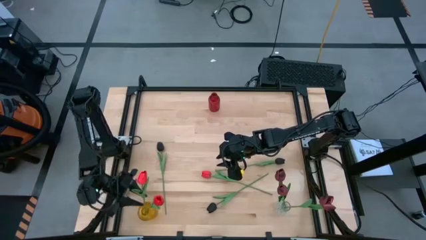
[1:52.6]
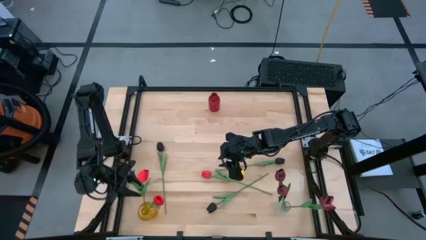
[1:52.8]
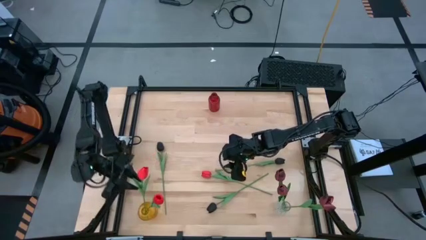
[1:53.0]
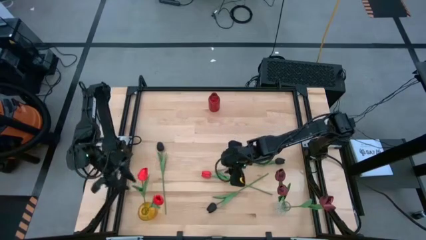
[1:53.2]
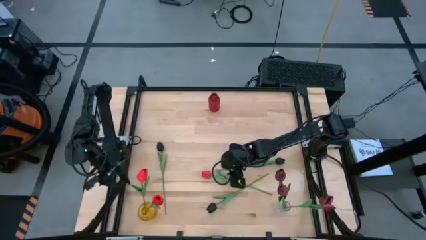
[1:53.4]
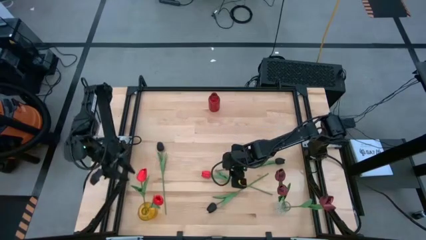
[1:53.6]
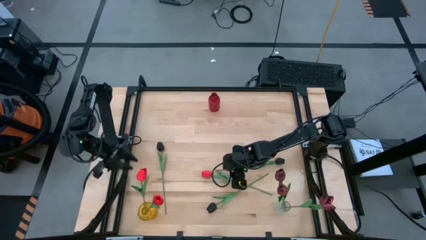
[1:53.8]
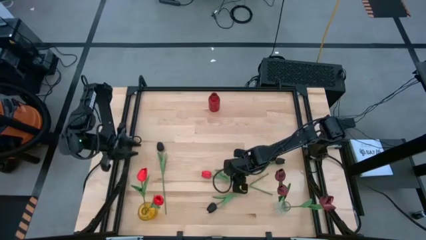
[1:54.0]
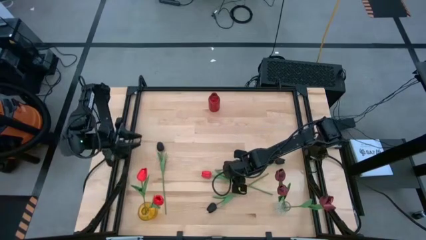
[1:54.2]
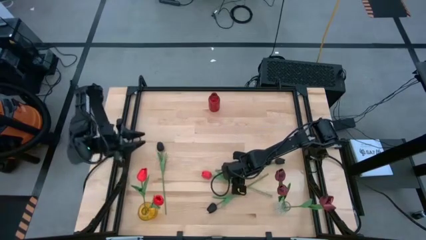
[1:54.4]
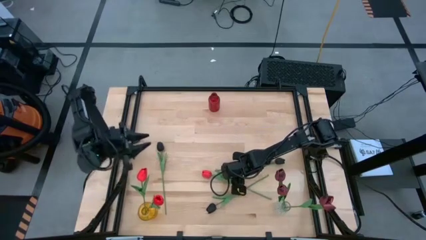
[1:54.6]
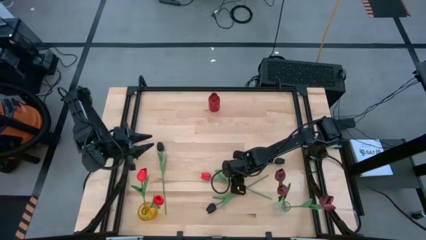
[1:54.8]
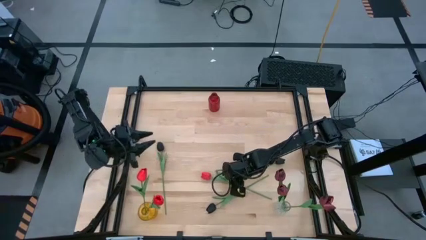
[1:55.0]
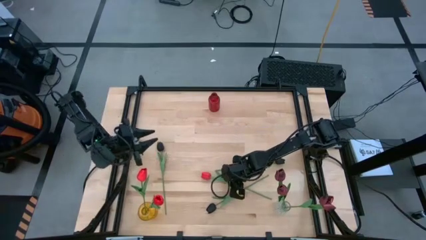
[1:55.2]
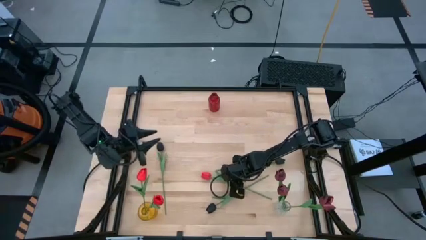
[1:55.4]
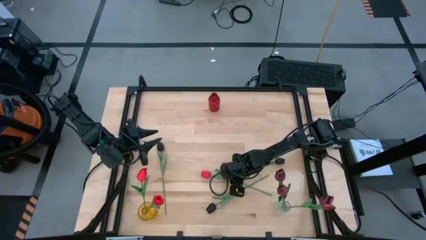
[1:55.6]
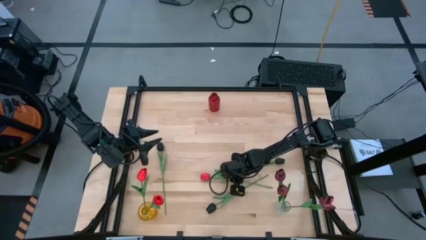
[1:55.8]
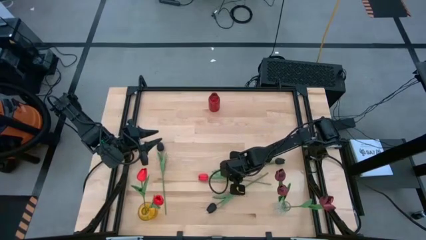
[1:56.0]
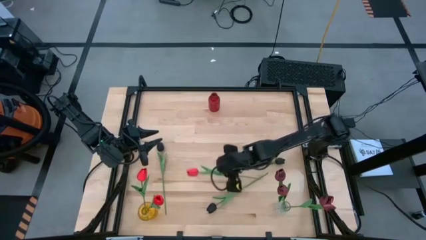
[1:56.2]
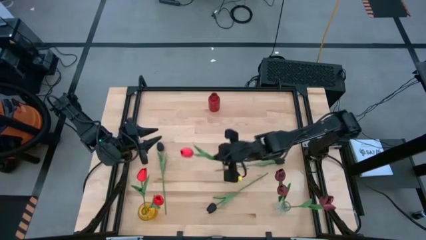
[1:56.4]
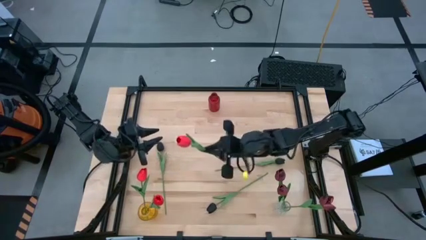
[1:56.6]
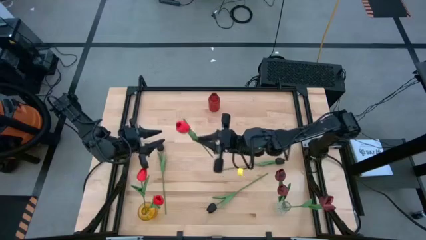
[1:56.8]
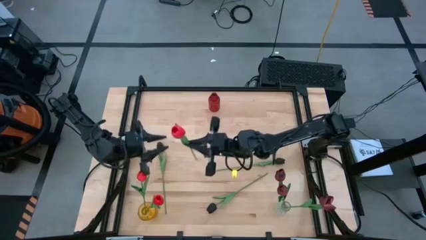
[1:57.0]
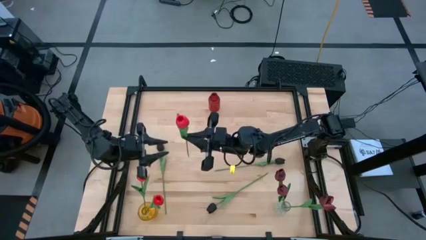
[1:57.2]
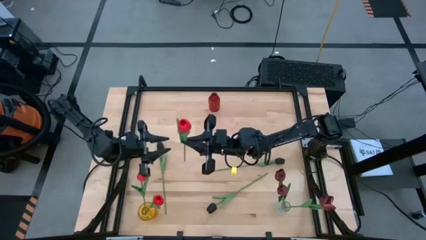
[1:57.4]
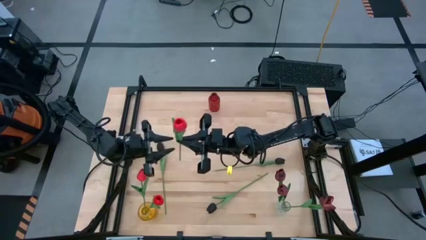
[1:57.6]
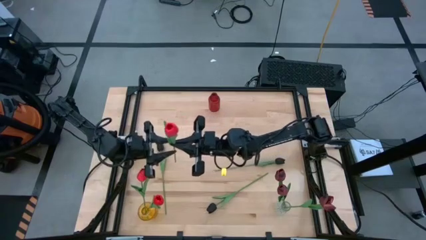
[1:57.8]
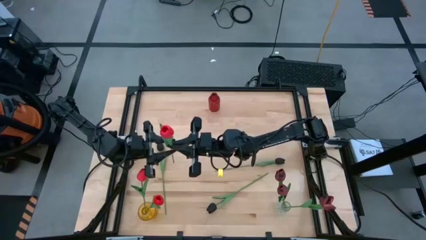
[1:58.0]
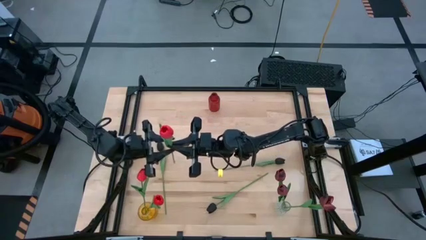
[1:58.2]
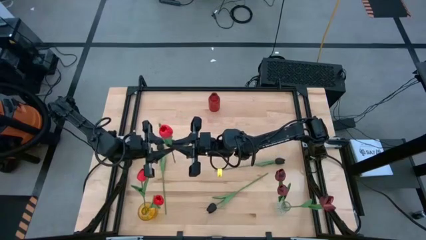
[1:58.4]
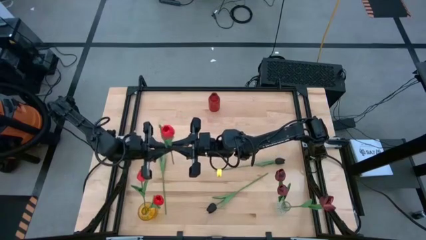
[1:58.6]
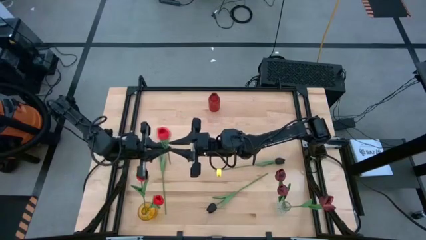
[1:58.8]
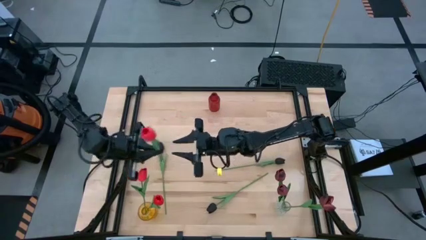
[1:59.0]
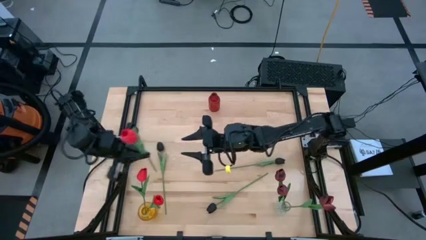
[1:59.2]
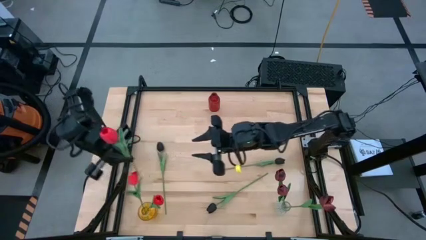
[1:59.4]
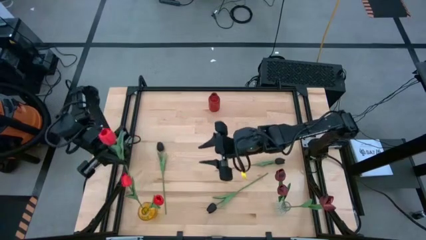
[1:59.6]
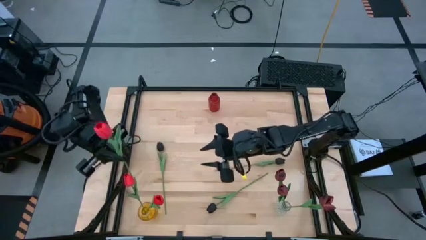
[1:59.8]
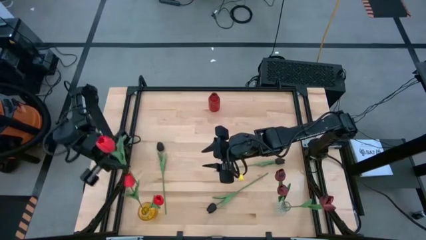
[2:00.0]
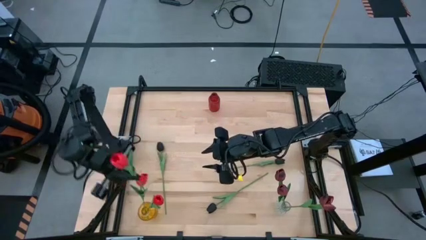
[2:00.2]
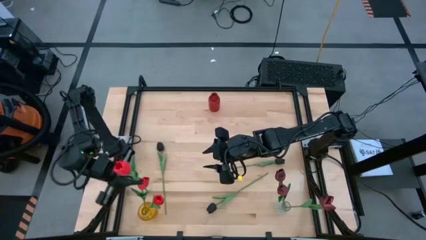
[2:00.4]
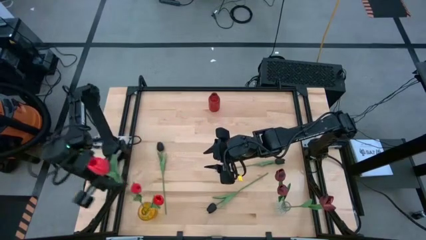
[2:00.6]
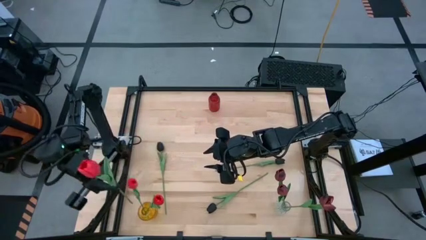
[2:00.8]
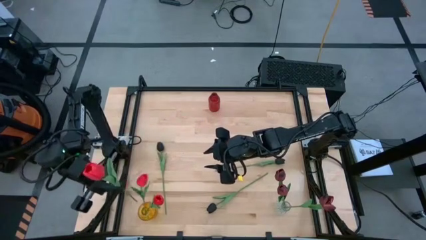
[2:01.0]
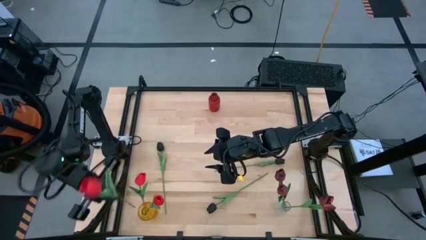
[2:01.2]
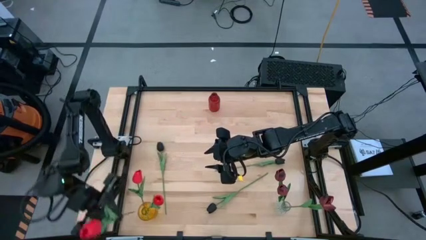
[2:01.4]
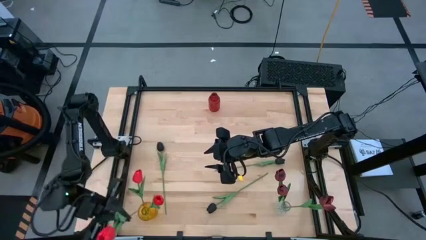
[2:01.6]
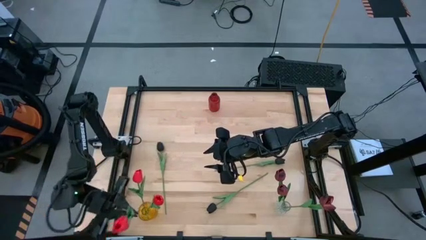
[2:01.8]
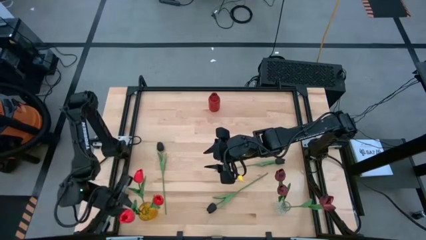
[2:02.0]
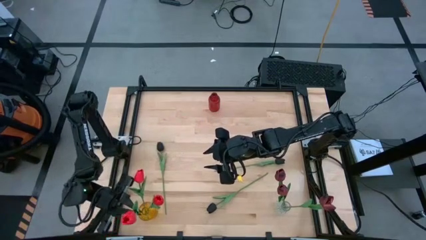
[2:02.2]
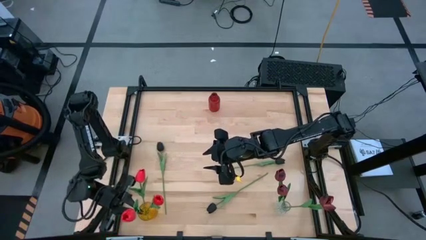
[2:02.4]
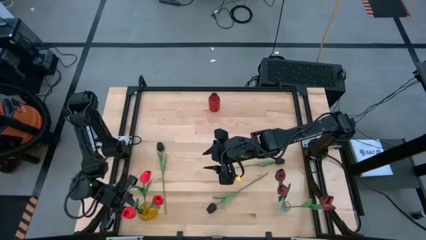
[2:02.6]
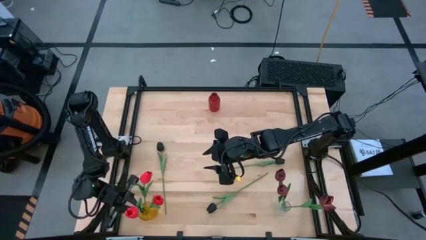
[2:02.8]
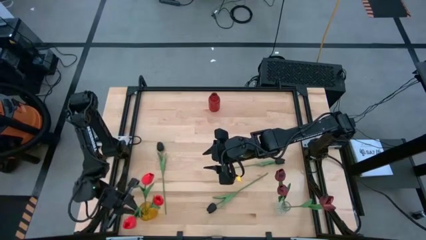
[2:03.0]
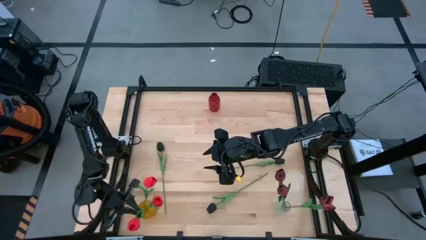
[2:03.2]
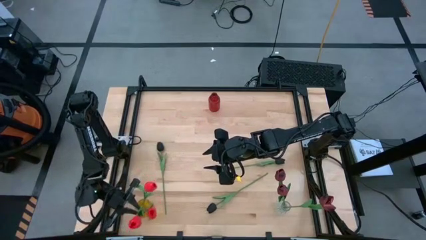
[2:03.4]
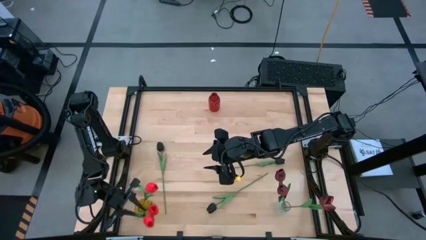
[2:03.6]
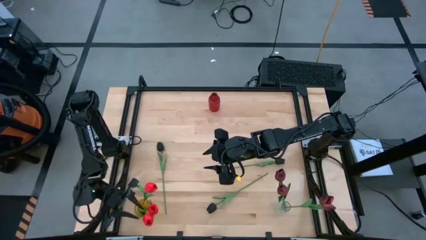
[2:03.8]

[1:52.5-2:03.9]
Task: Sort flowers into vase by color
Put the red flower into the yellow vase

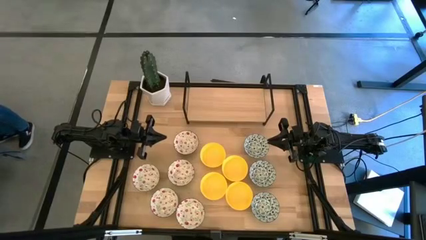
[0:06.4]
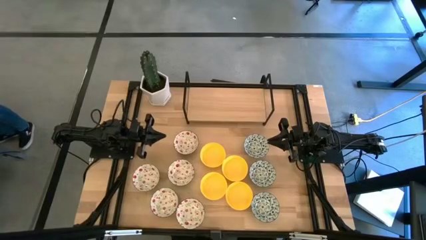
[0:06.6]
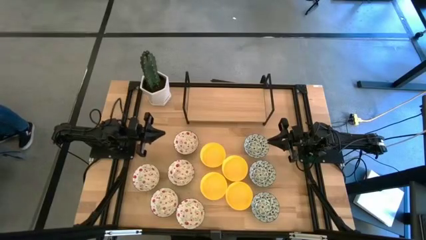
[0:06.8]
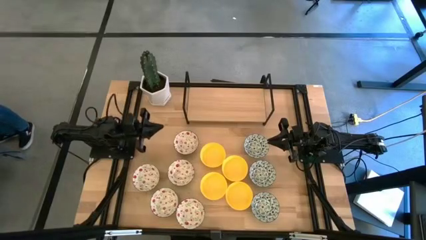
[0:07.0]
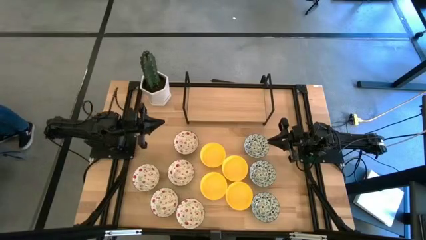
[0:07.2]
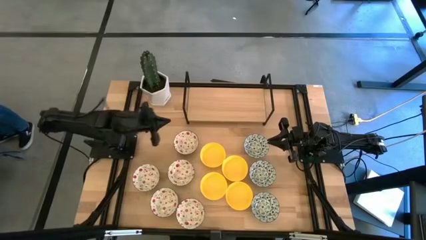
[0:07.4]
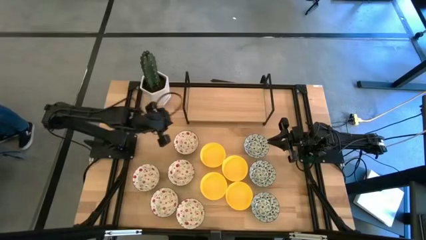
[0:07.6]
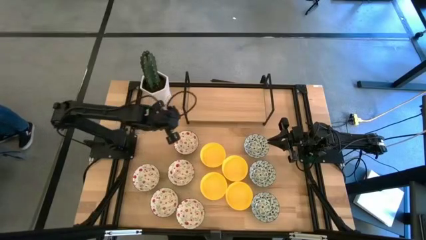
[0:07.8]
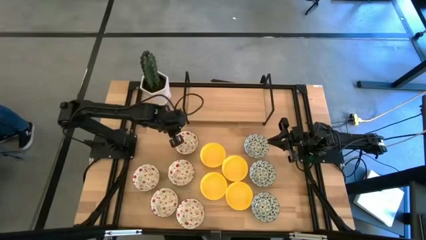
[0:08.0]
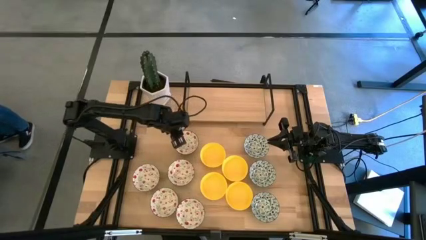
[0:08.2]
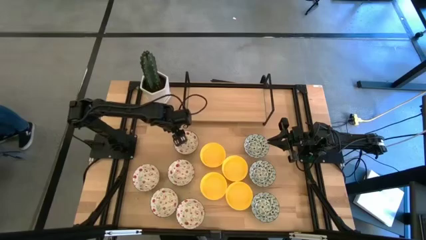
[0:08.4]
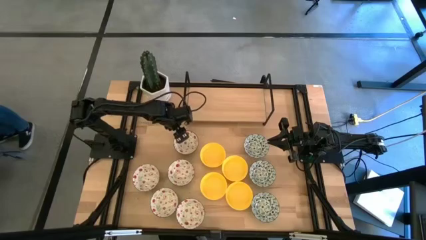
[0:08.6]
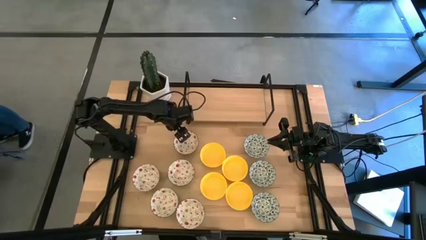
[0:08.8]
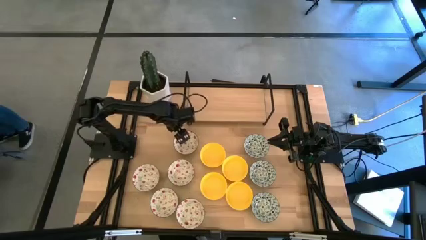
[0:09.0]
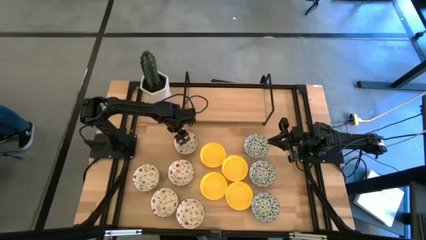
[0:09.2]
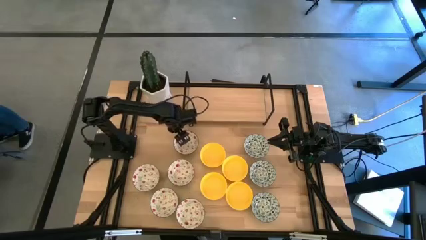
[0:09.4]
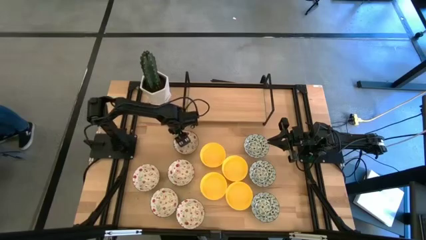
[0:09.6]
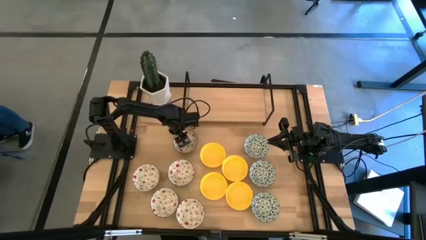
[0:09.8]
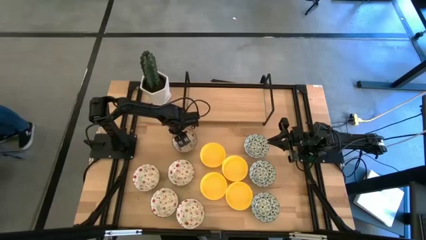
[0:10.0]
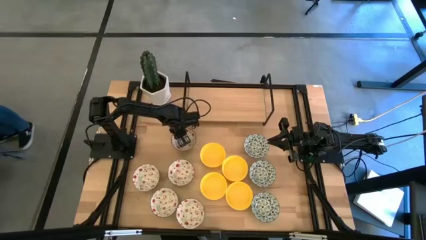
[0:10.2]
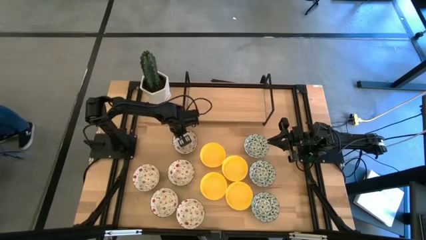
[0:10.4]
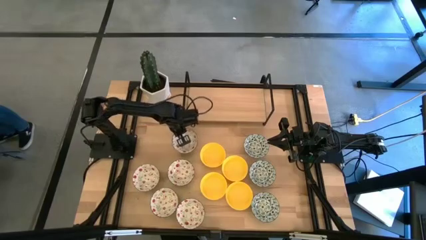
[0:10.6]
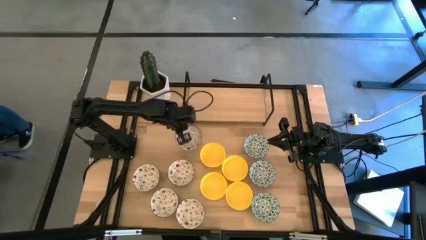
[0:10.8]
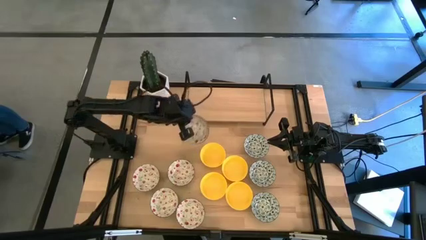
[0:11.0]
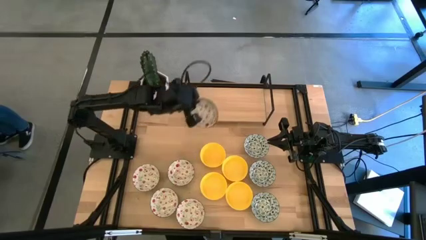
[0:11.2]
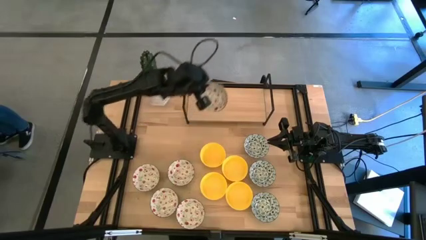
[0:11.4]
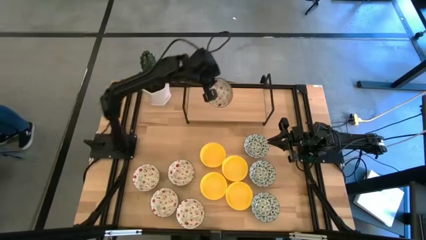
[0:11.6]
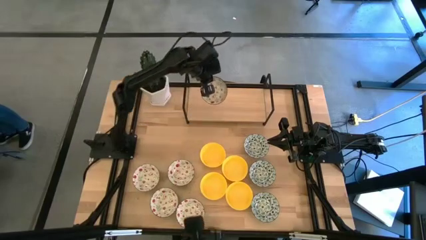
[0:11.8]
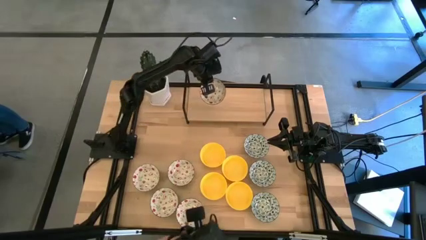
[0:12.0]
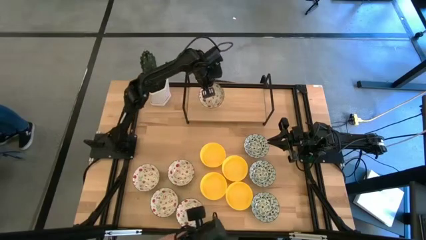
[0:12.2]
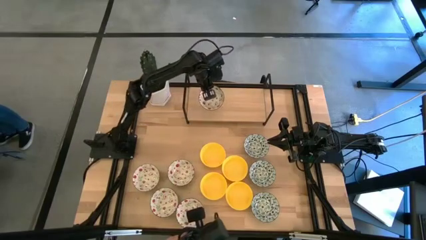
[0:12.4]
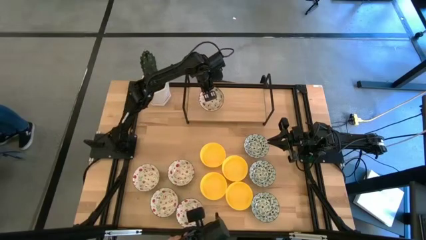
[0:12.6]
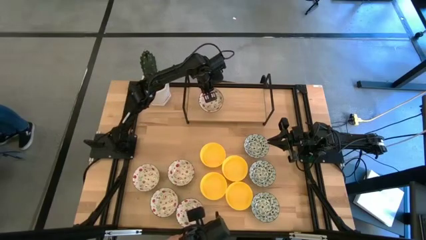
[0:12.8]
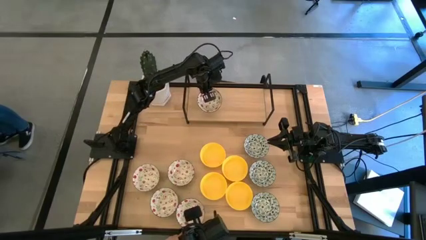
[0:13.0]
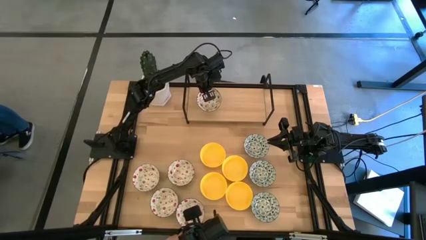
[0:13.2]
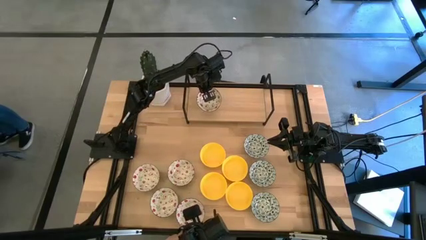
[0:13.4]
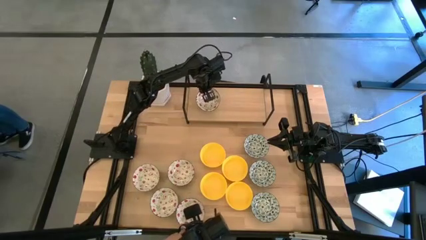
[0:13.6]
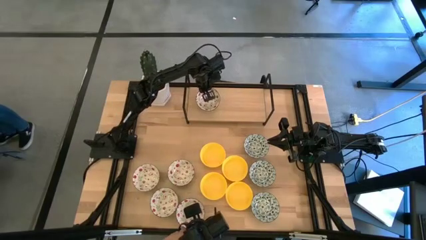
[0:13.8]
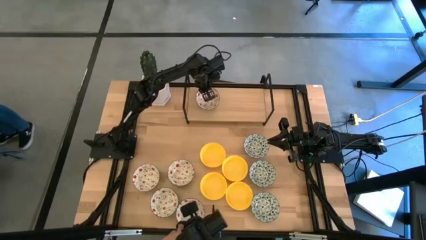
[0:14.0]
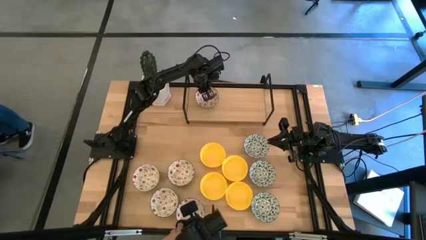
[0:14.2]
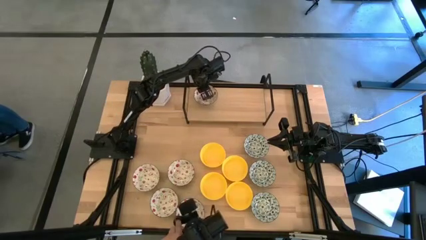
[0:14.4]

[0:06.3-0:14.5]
Task: Pick & Place Mini bowls
Put the top green bowl on the shelf
